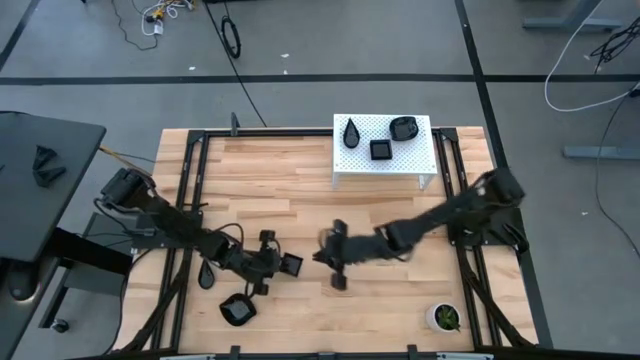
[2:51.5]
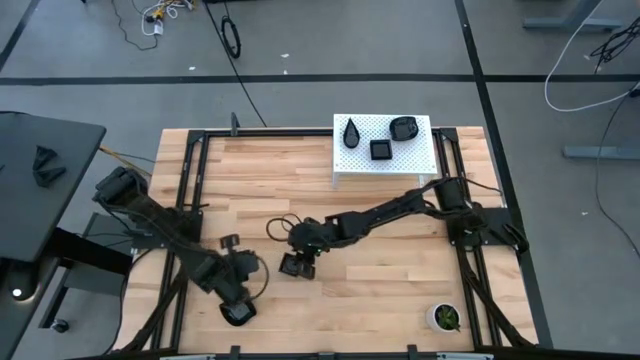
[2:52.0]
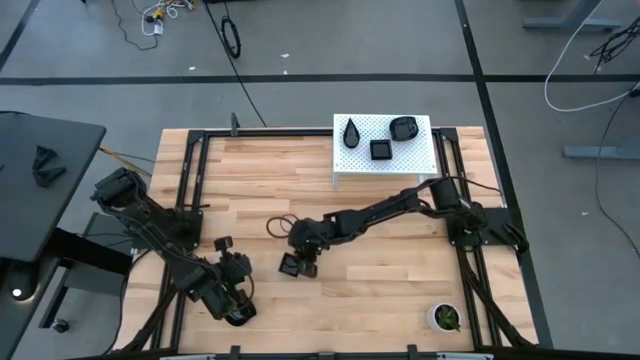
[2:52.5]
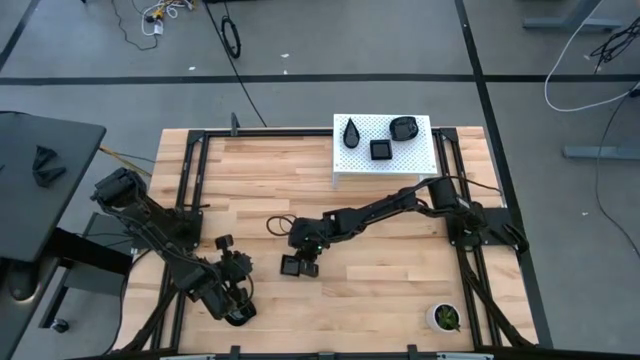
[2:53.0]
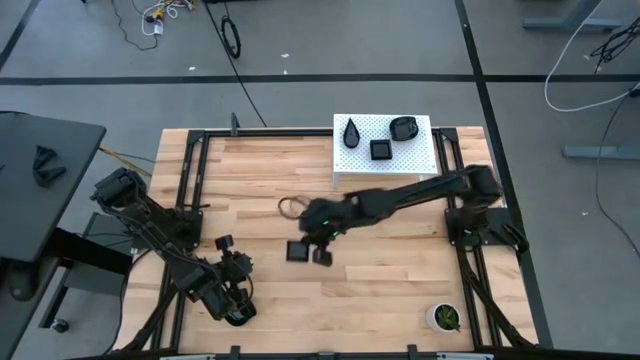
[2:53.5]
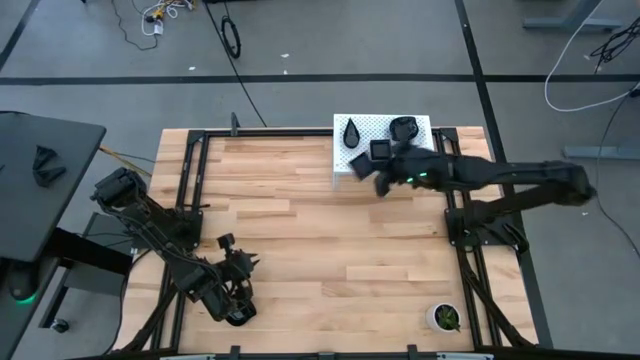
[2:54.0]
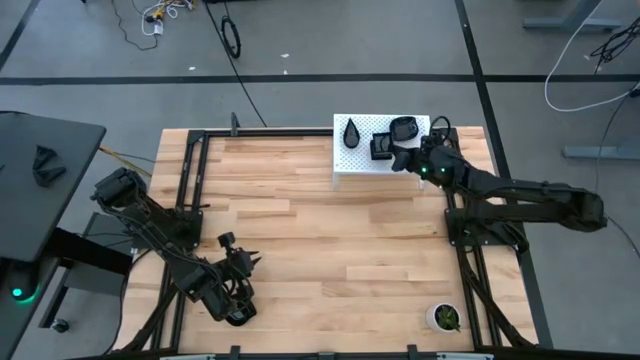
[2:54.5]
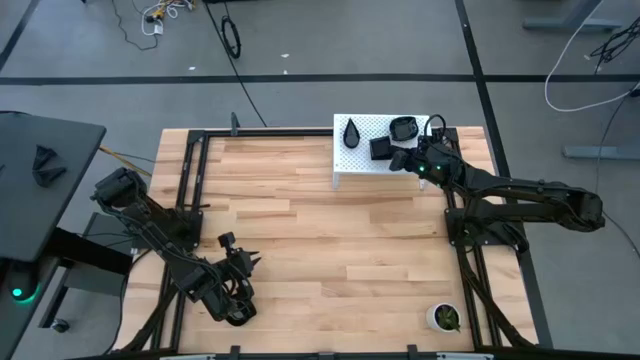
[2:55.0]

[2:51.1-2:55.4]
Task: Pick & Place Mini shaped plates
Stack the black square plate on the stacked black square plates on the shelf

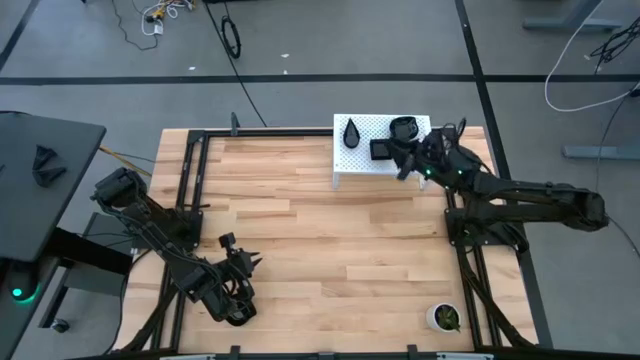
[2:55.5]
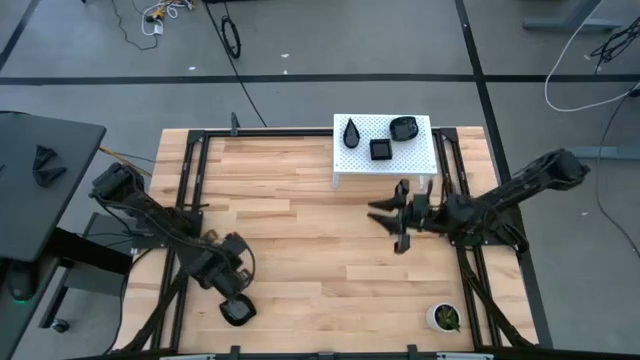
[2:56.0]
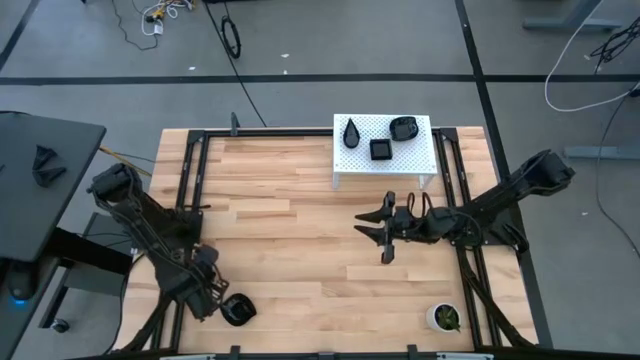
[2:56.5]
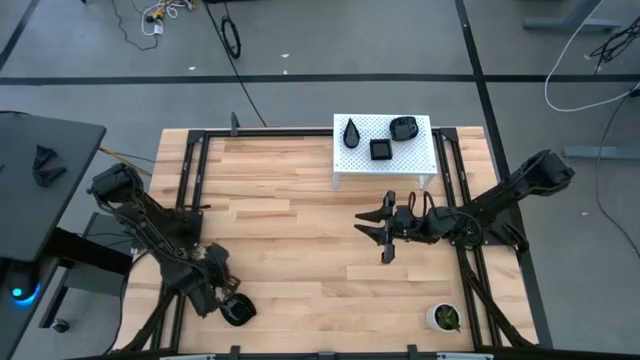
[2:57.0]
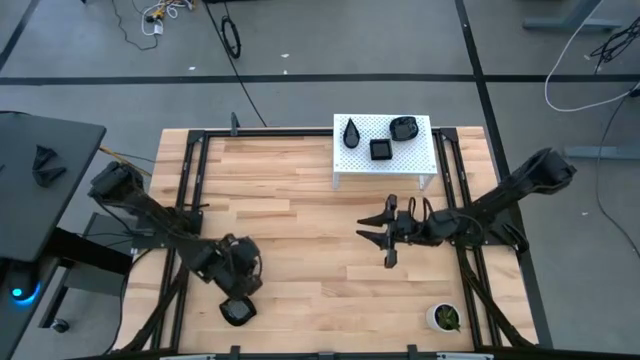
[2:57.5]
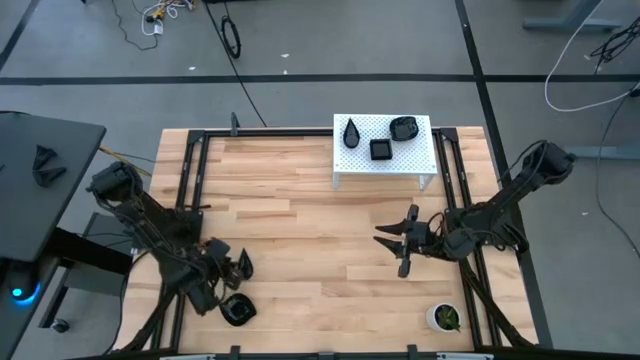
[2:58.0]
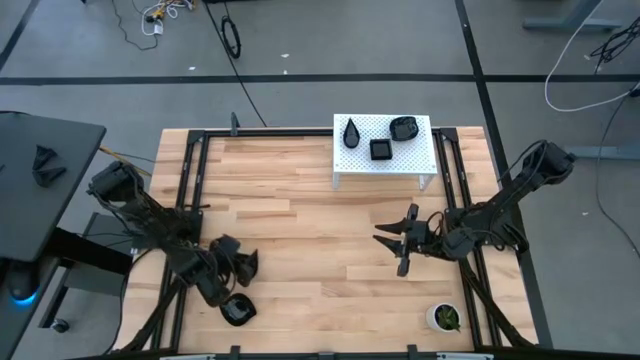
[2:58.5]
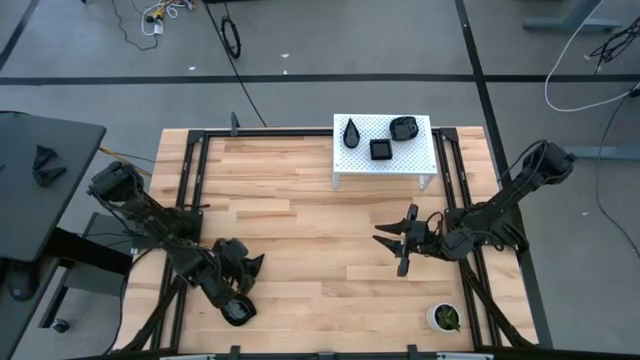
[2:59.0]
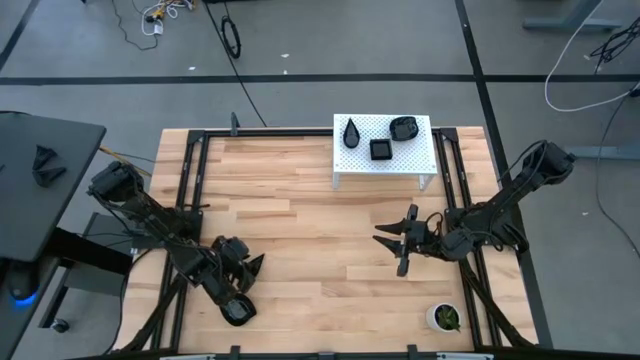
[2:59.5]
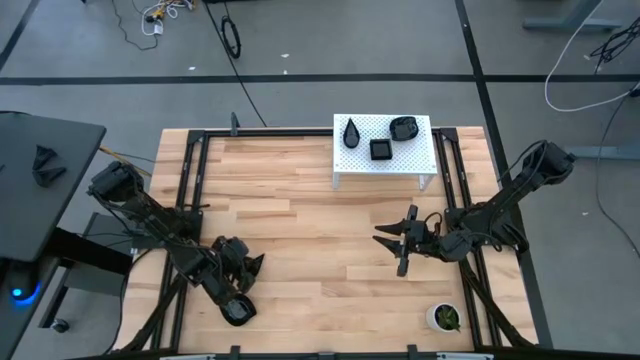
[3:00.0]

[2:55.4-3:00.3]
Stack the black drop shaped plate on the black drop shaped plate on the shelf

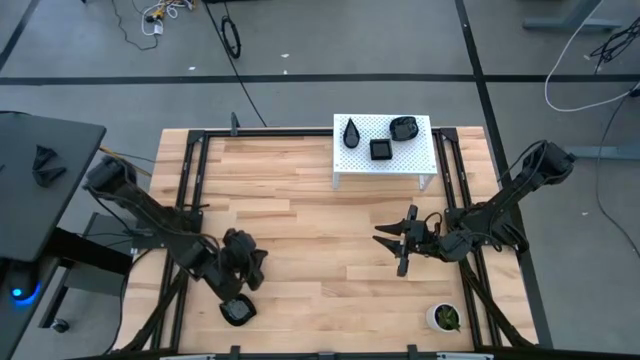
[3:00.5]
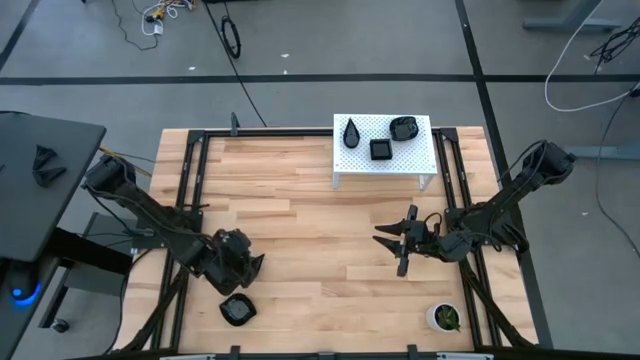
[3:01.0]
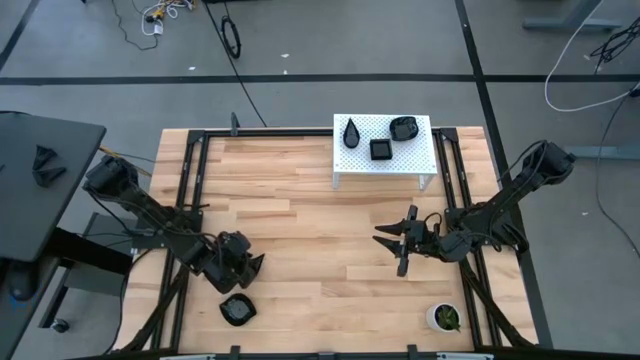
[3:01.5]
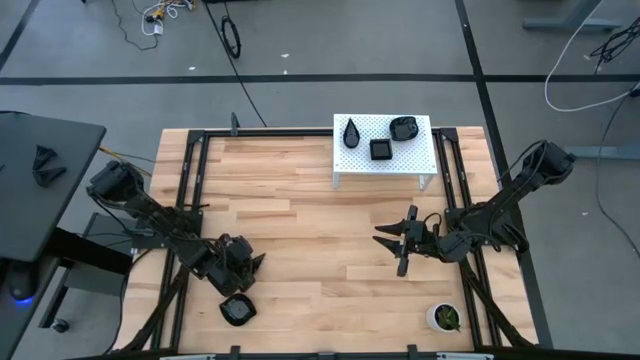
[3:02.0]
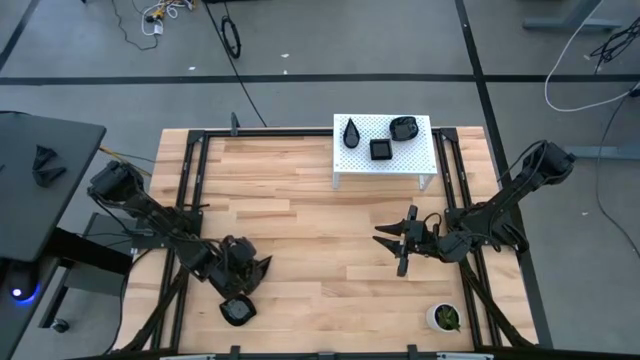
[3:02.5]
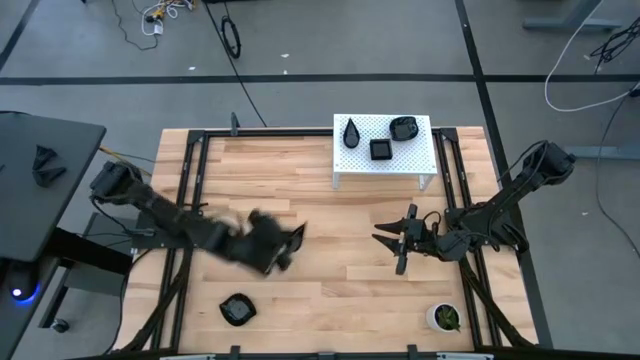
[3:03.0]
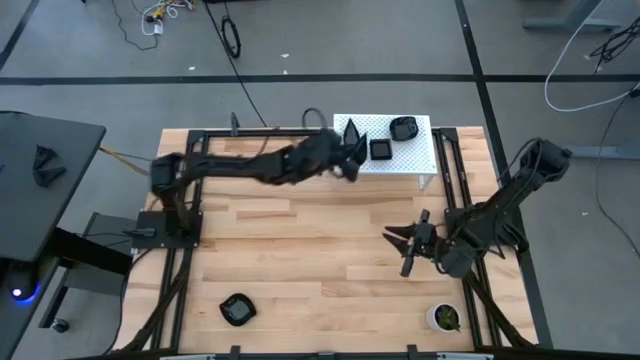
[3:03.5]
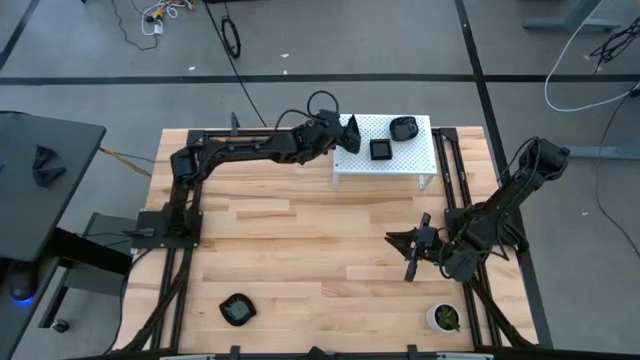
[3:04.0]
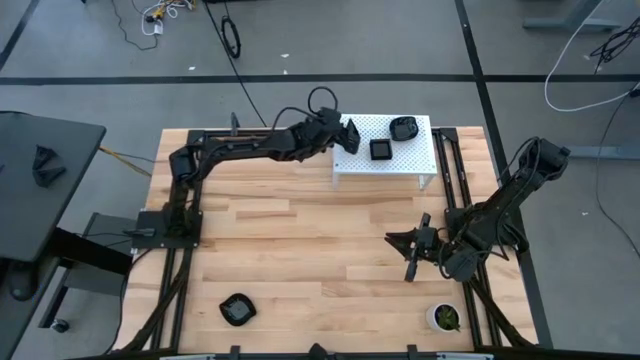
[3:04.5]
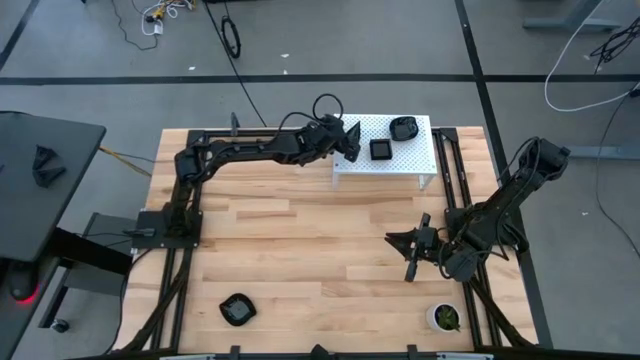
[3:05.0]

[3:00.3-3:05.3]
Stack the black drop shaped plate on the stacked black drop shaped plates on the shelf

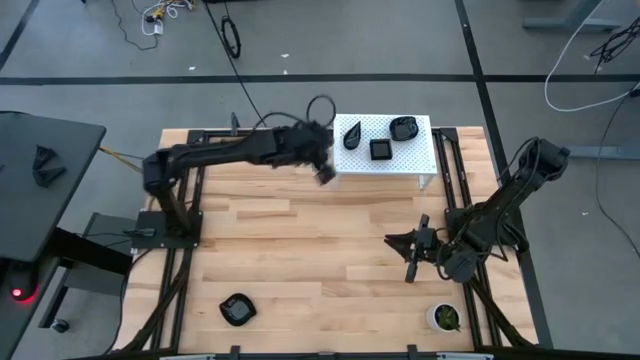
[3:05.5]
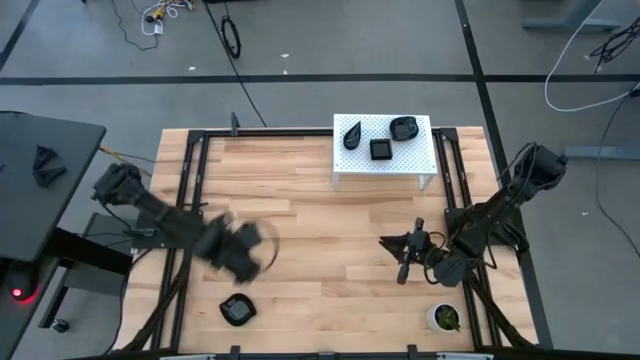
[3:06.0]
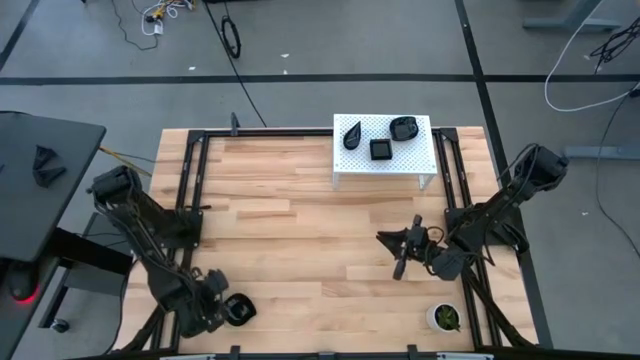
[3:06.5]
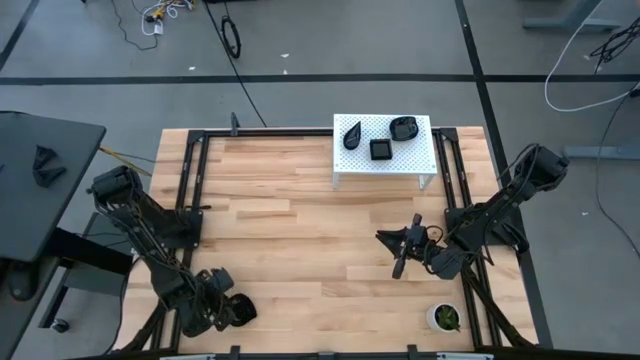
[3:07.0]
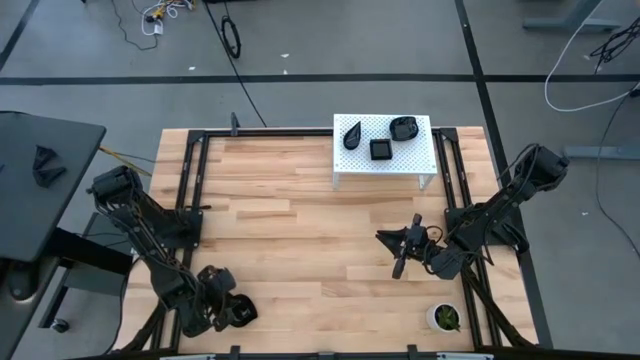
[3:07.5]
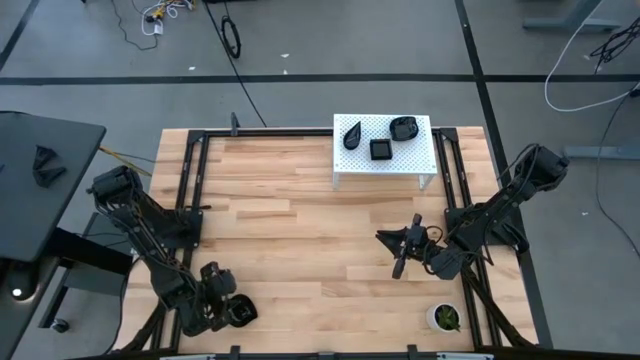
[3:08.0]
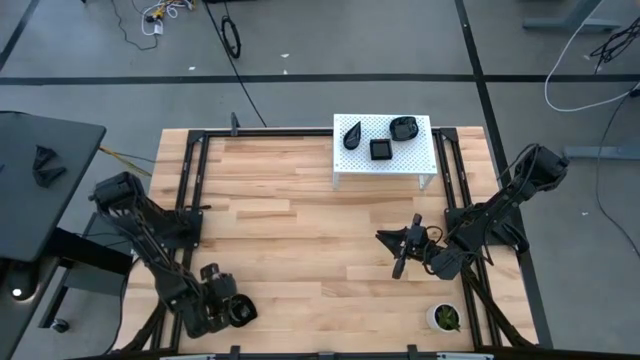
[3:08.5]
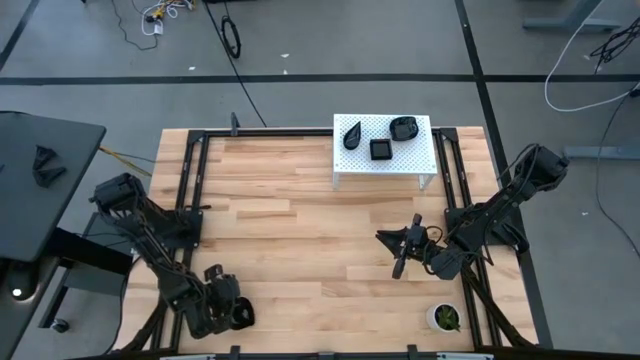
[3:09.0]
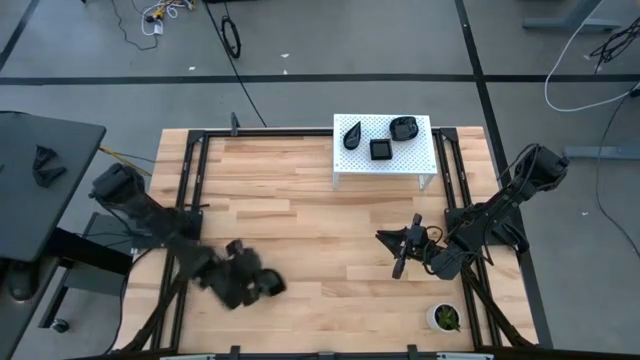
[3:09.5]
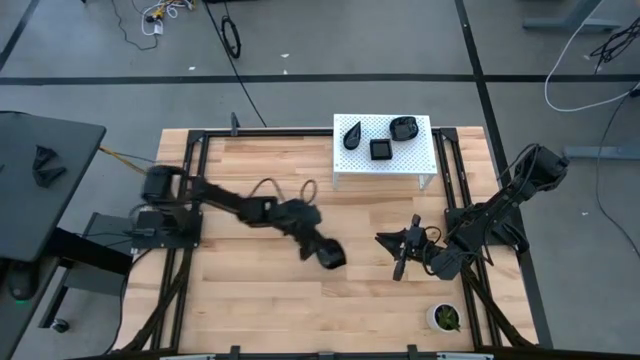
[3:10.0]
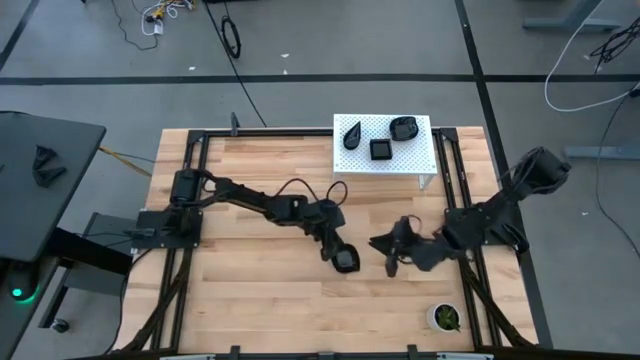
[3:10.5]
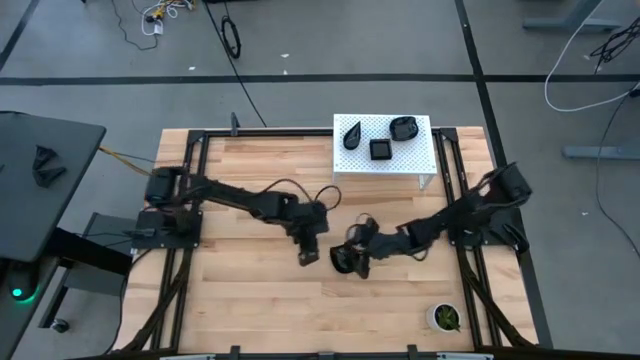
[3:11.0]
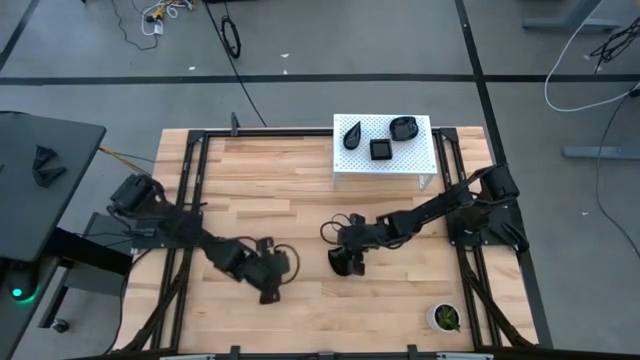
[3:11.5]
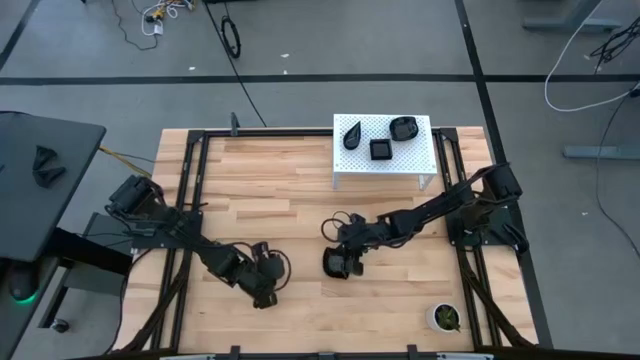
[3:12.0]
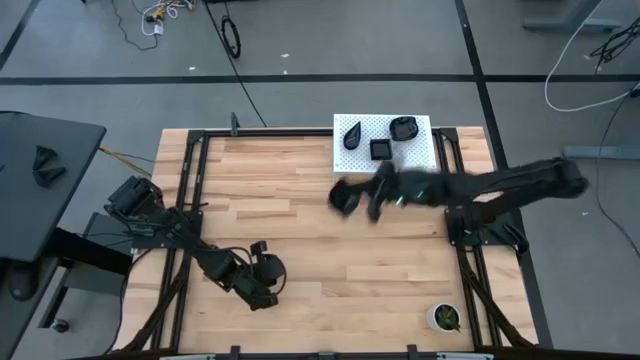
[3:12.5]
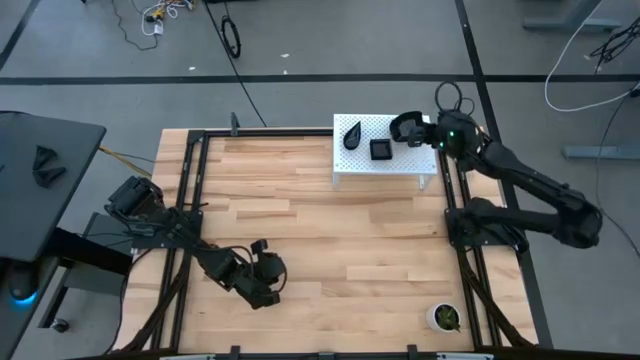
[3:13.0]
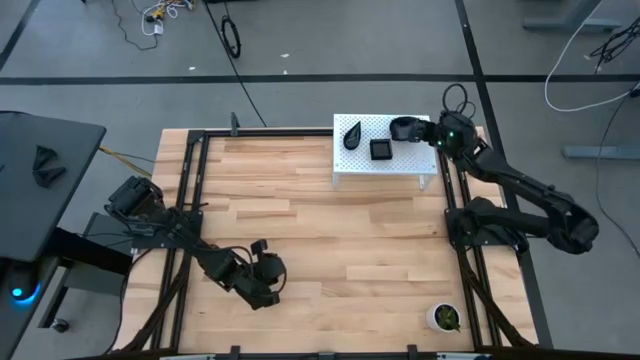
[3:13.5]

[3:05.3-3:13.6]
Stack the black leaf shaped plate on the stacked black leaf shaped plates on the shelf
